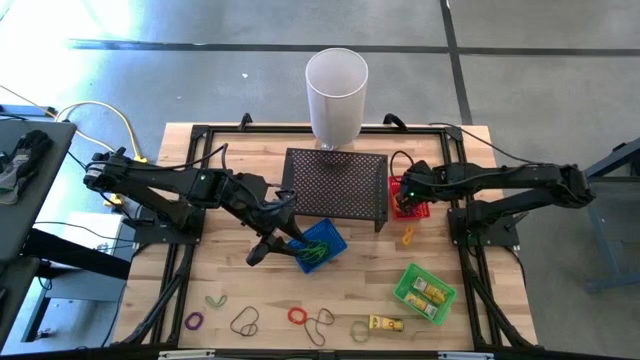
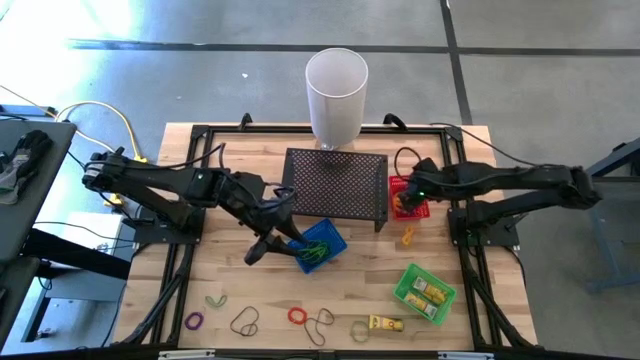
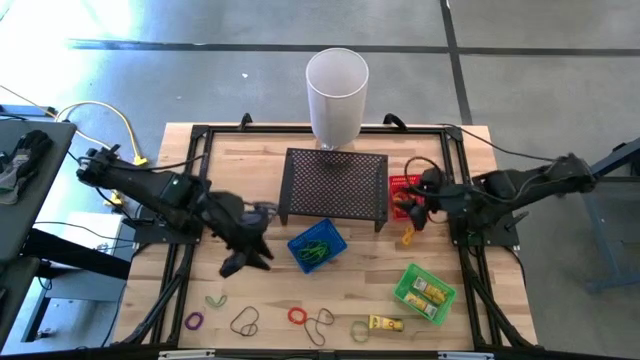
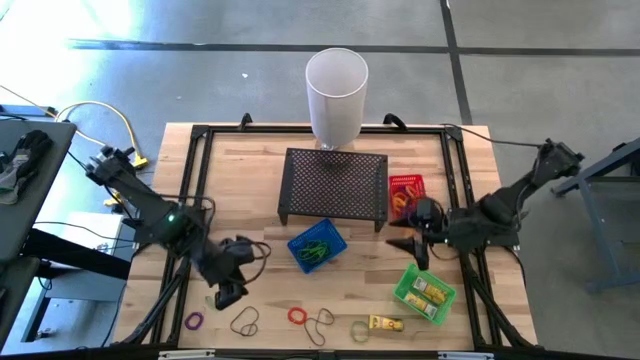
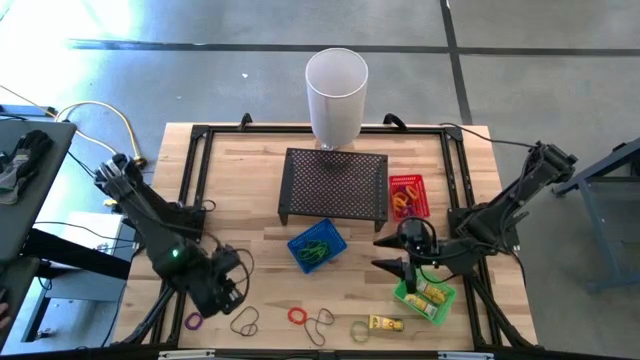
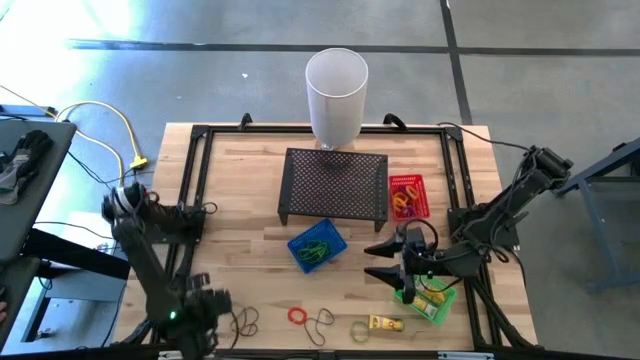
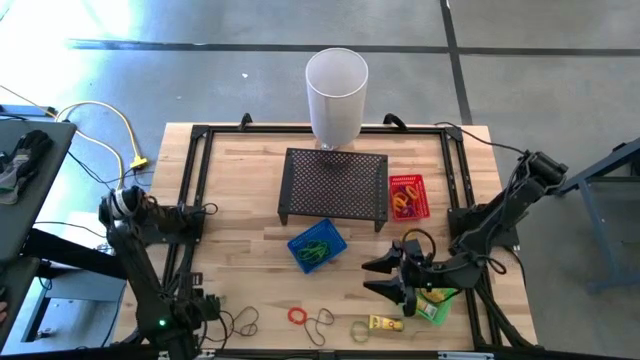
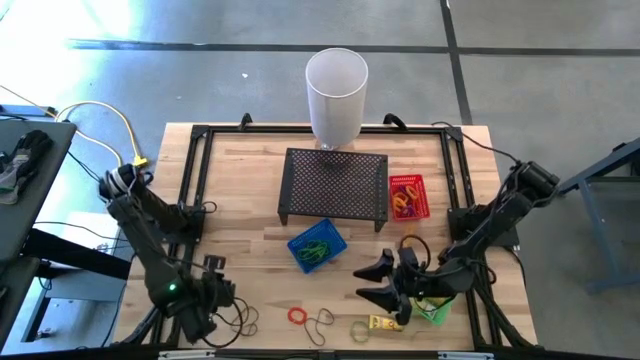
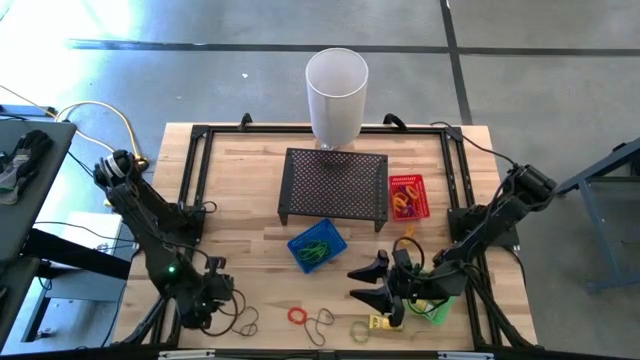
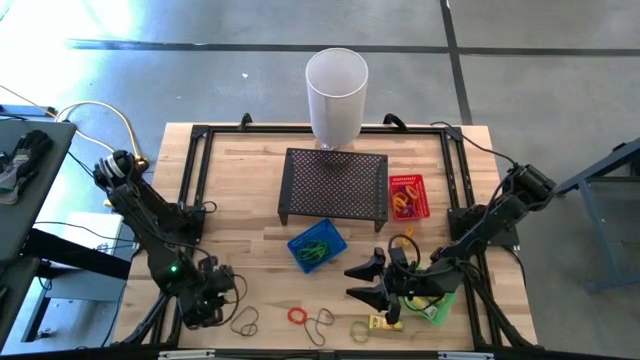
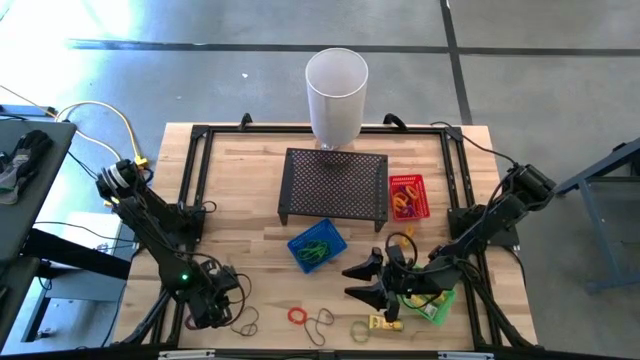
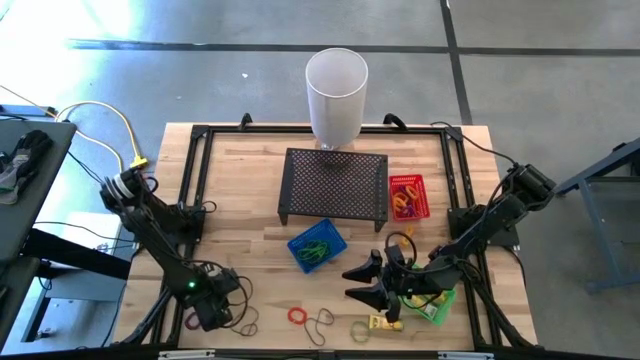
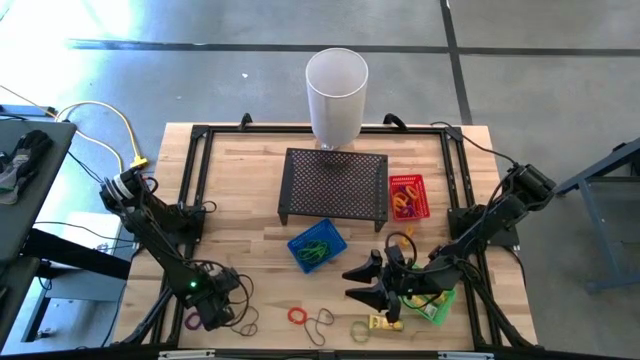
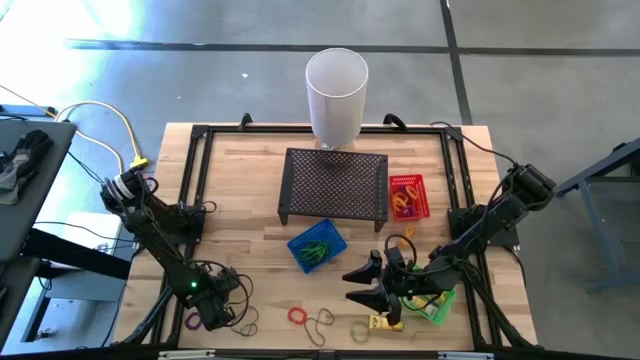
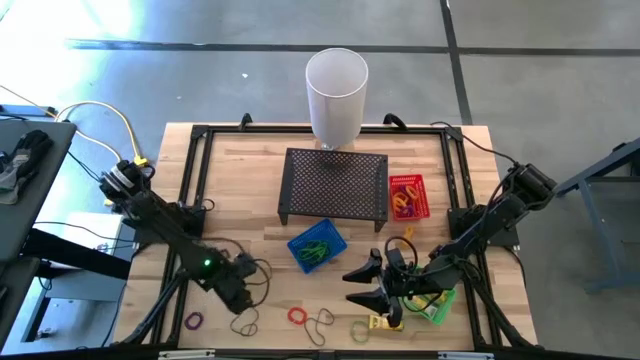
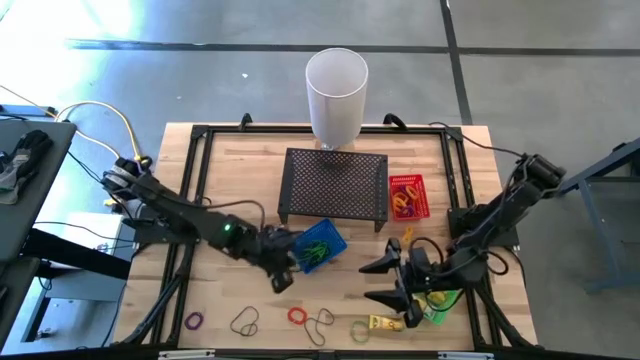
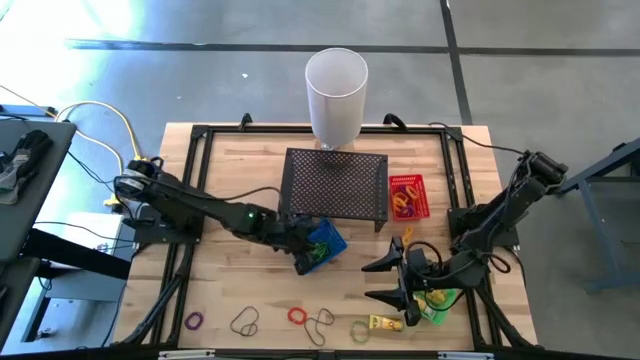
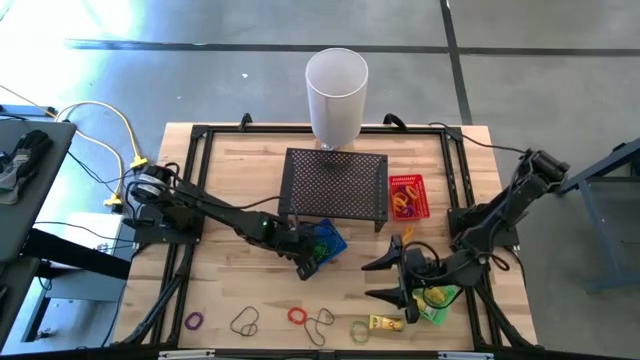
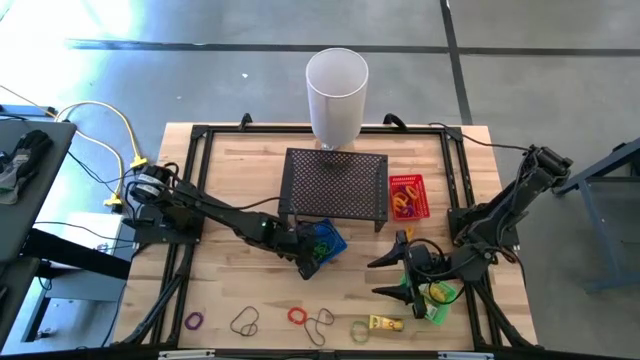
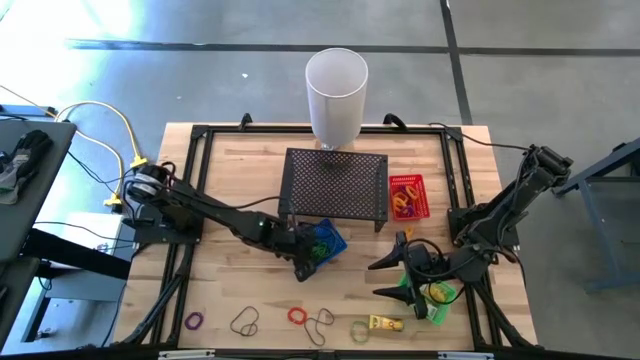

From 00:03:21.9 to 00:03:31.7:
Task: Pick & Place Office Desk Supplies
Put the green rubber band into the blue bin

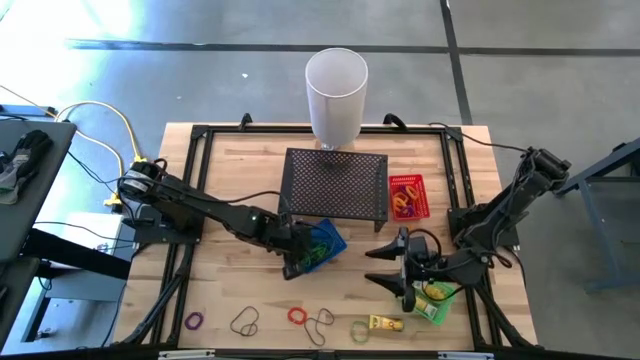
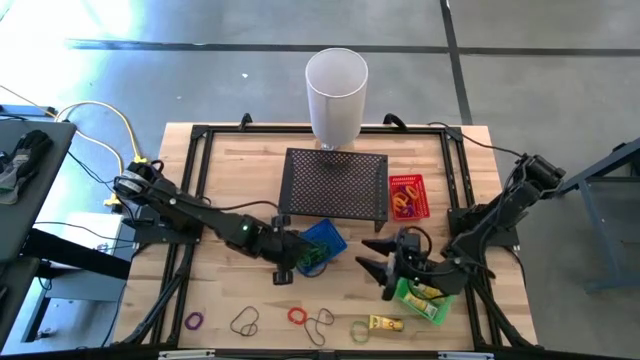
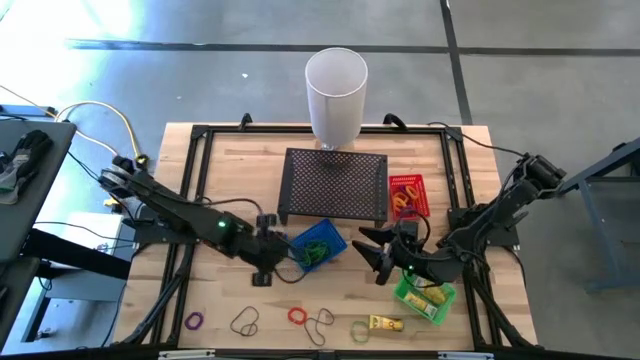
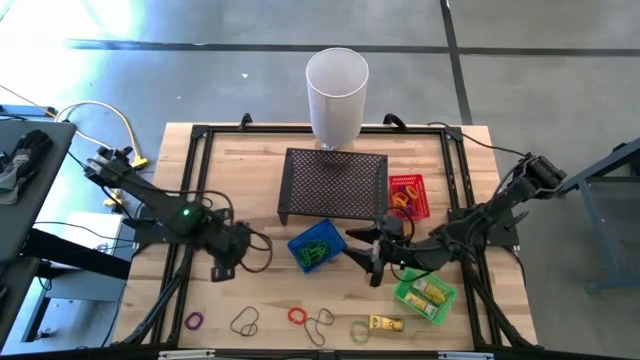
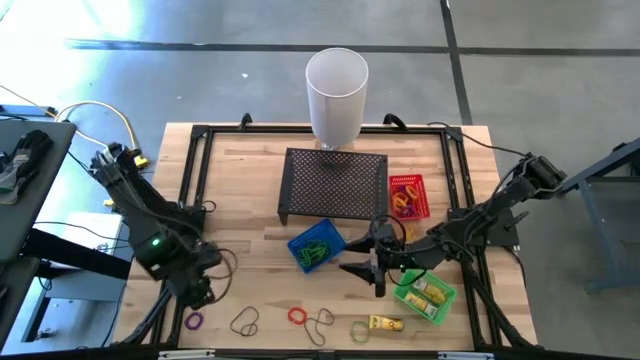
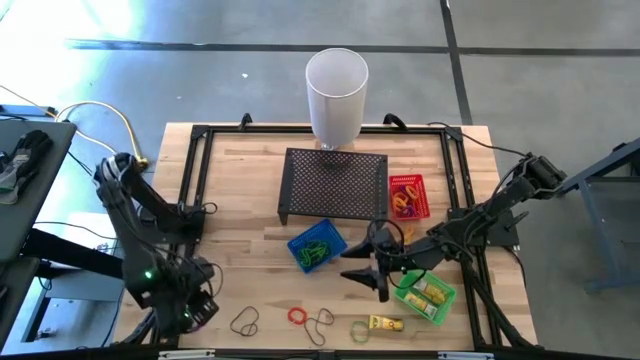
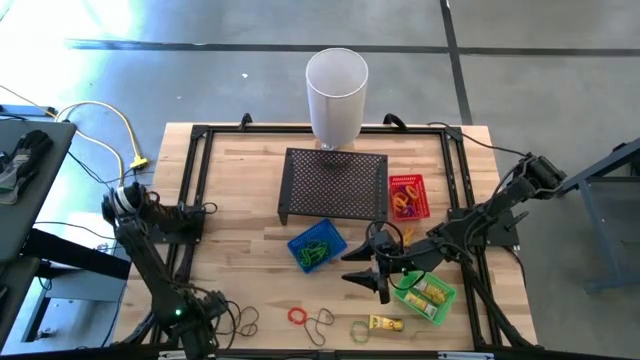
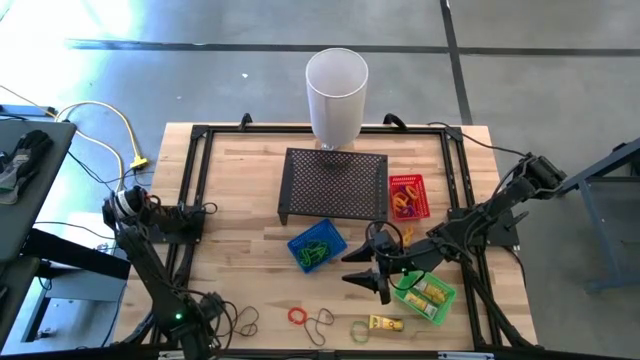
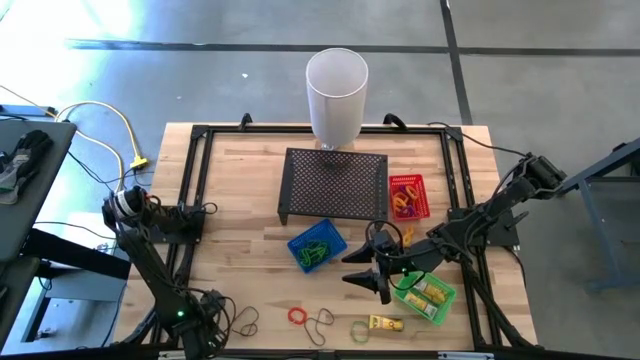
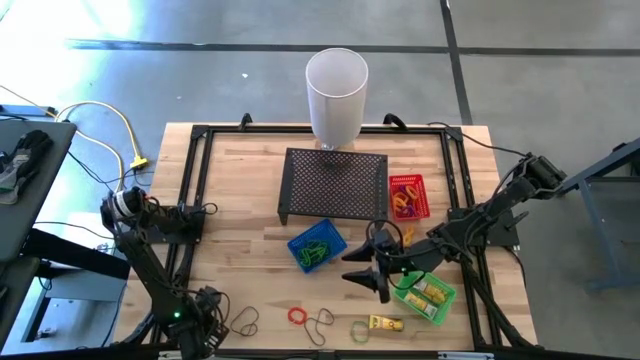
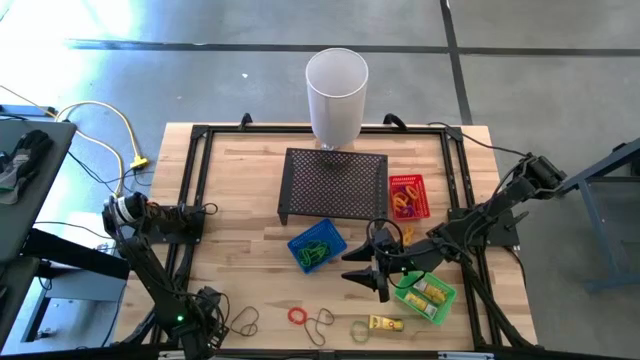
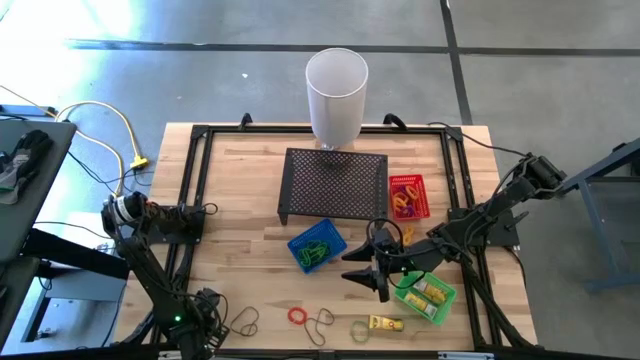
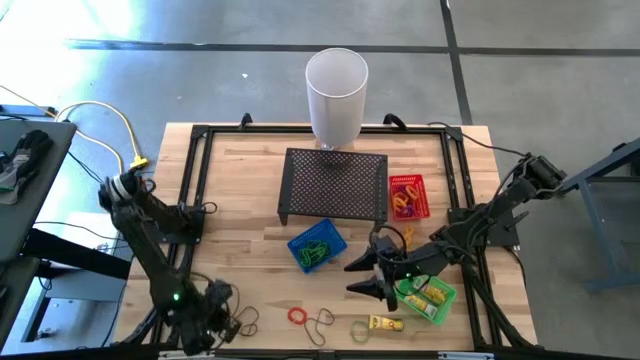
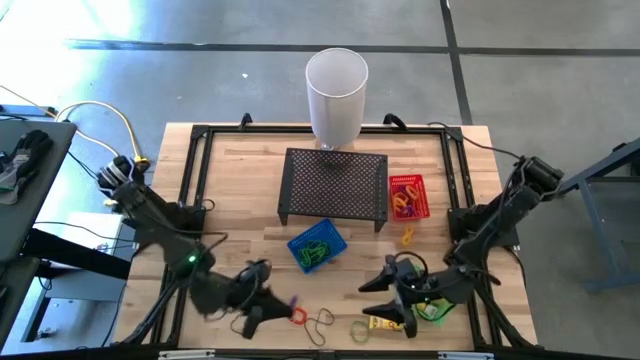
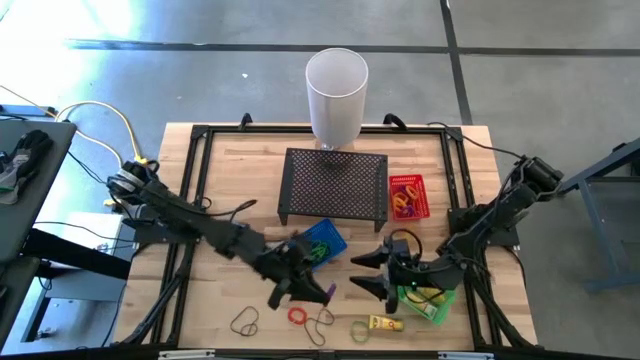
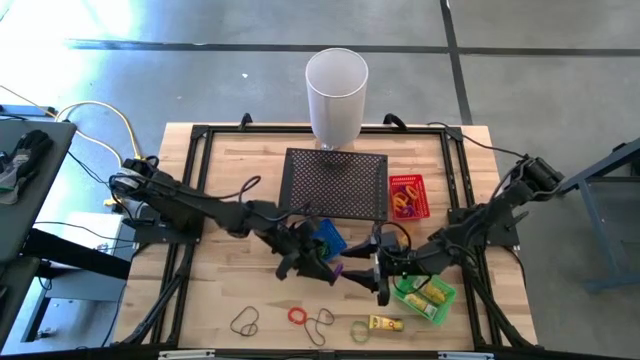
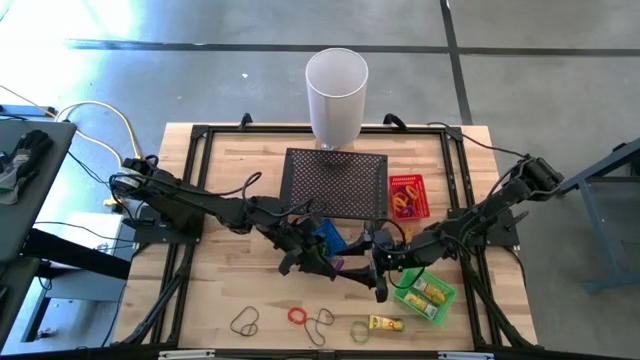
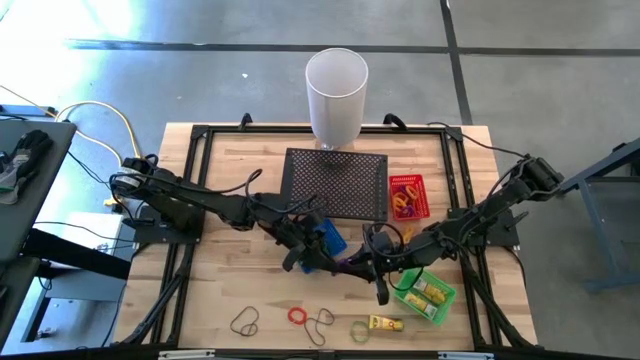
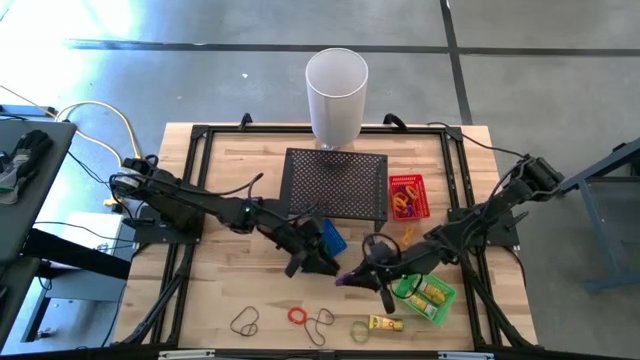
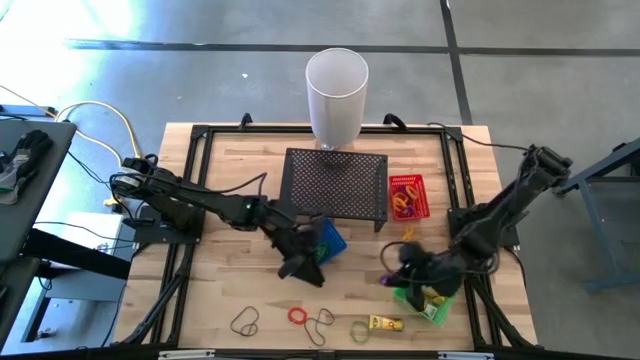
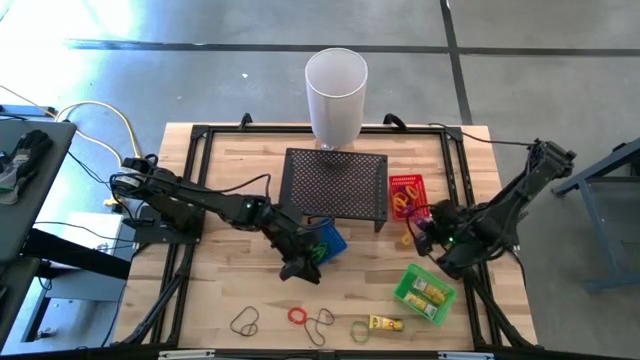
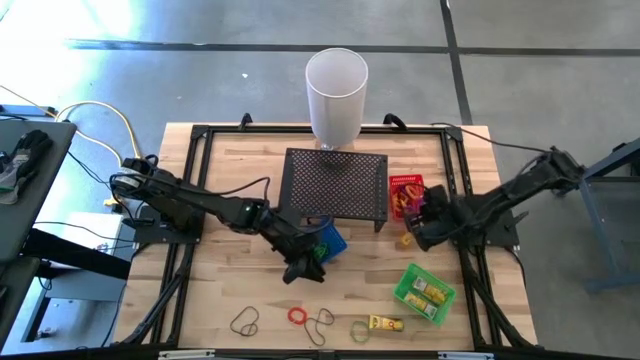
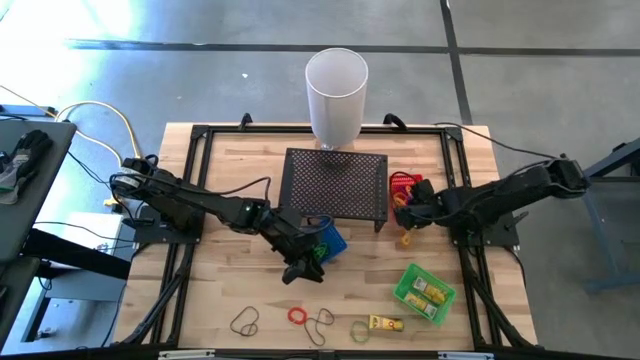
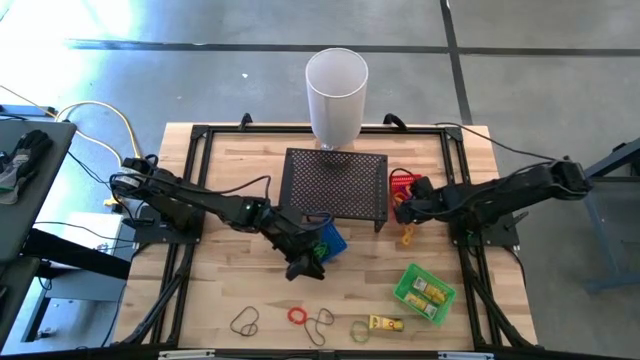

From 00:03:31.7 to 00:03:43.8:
Put the violet spring keychain into the red bin
